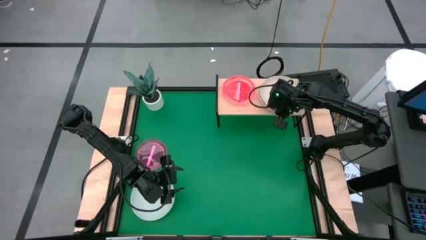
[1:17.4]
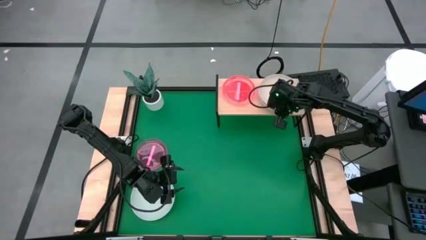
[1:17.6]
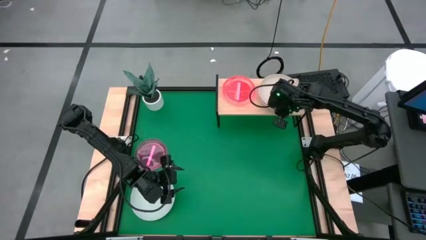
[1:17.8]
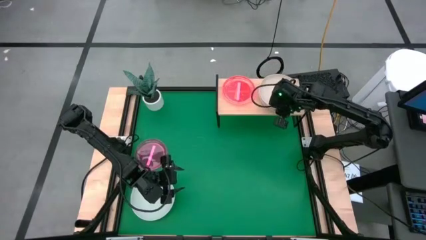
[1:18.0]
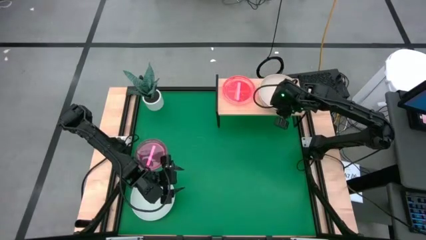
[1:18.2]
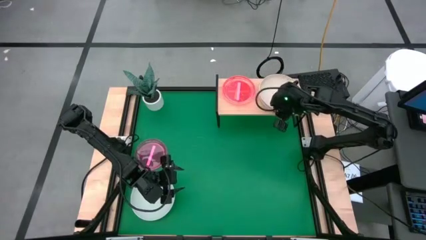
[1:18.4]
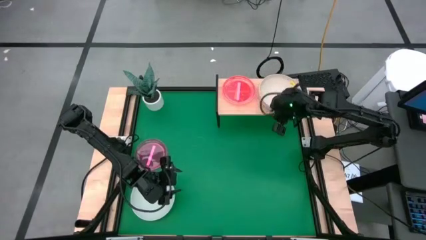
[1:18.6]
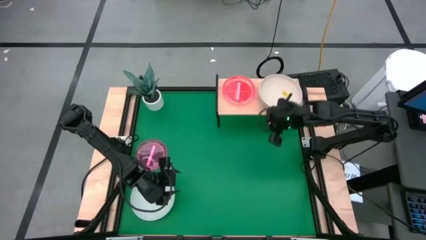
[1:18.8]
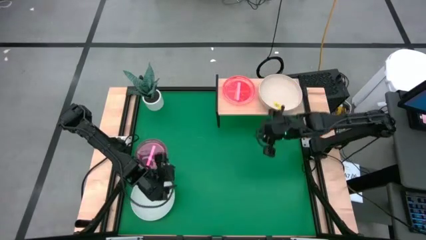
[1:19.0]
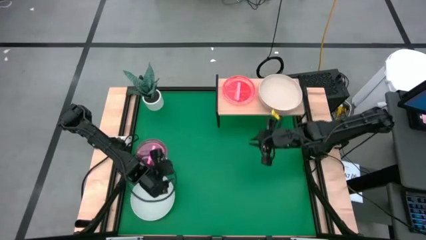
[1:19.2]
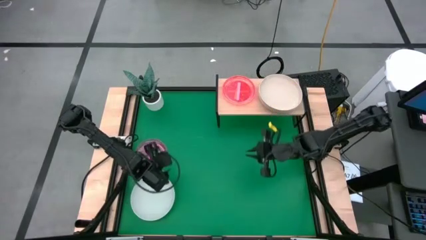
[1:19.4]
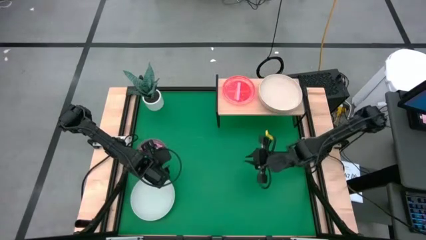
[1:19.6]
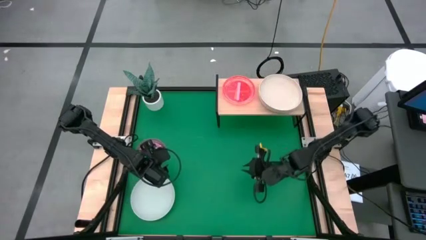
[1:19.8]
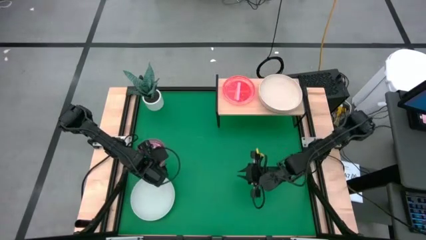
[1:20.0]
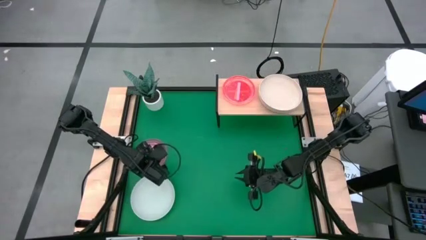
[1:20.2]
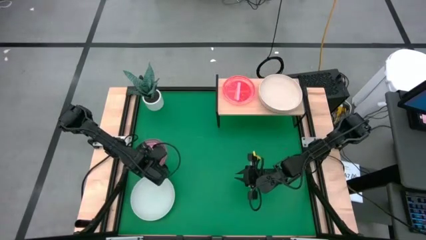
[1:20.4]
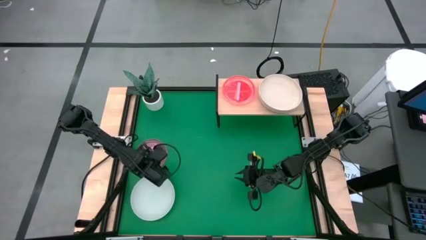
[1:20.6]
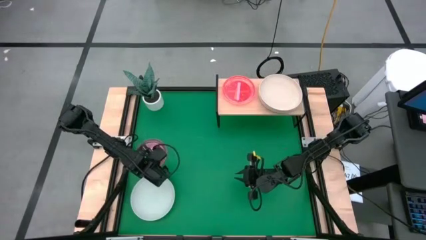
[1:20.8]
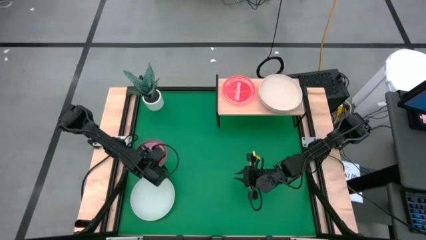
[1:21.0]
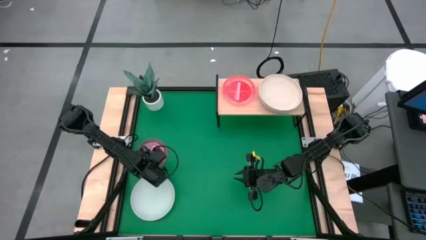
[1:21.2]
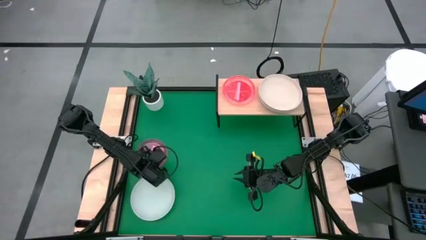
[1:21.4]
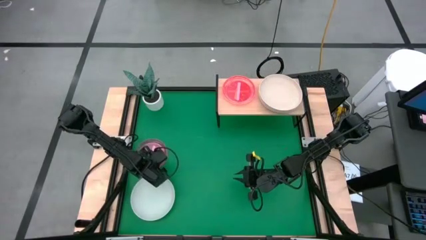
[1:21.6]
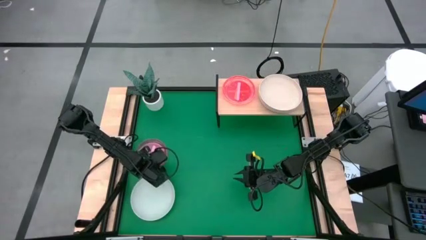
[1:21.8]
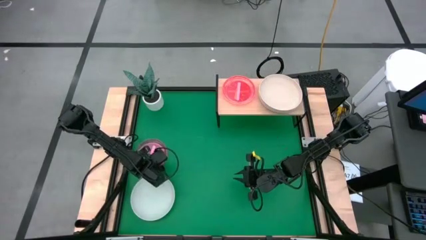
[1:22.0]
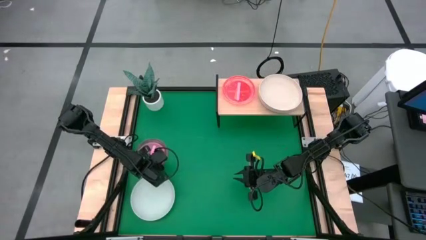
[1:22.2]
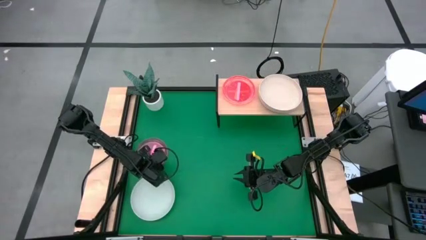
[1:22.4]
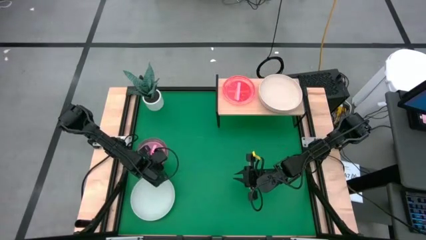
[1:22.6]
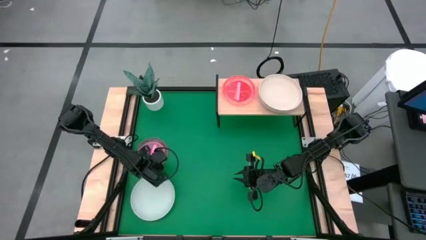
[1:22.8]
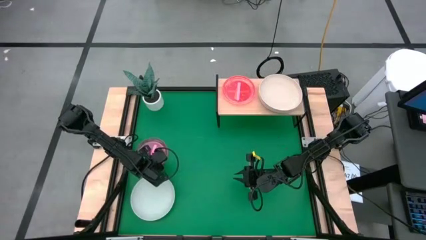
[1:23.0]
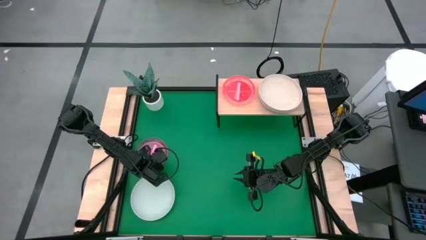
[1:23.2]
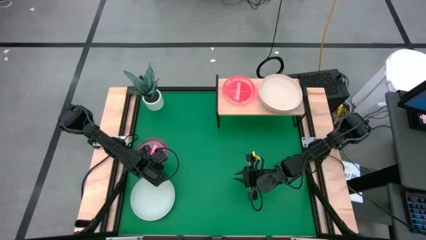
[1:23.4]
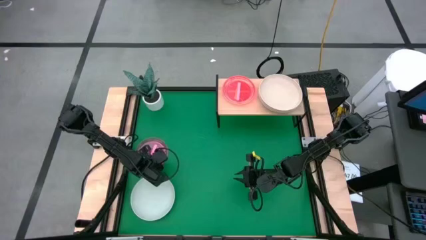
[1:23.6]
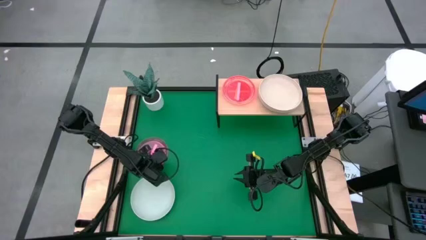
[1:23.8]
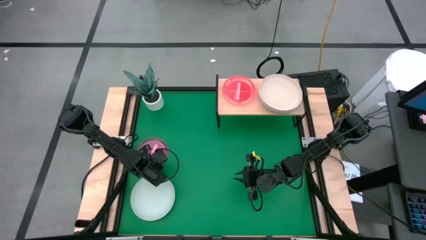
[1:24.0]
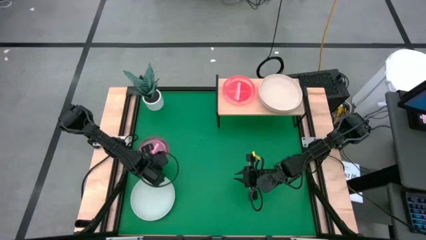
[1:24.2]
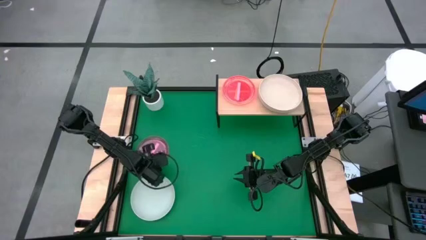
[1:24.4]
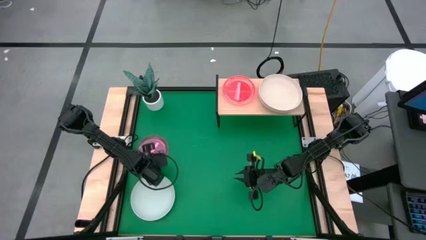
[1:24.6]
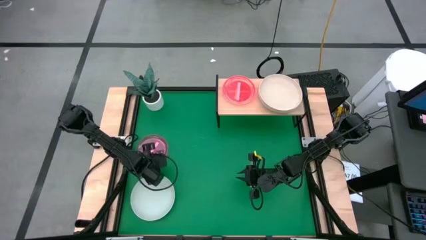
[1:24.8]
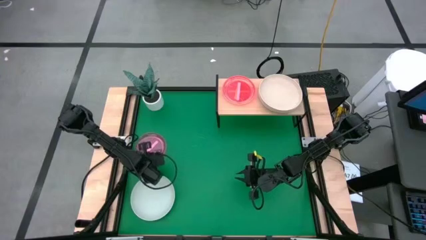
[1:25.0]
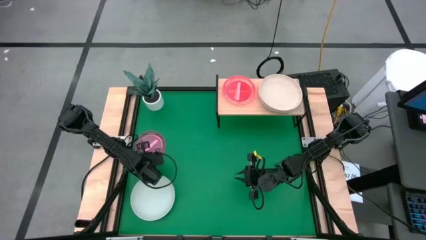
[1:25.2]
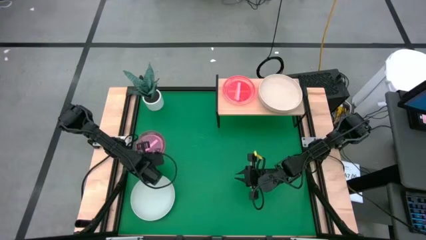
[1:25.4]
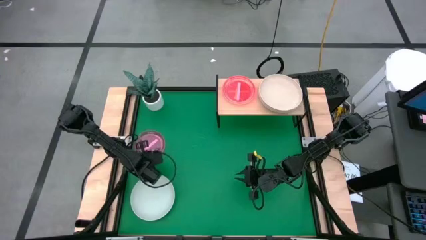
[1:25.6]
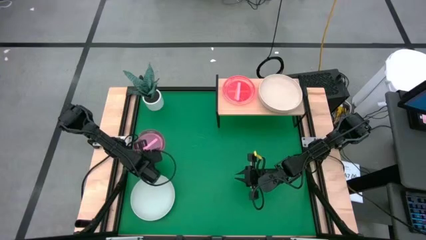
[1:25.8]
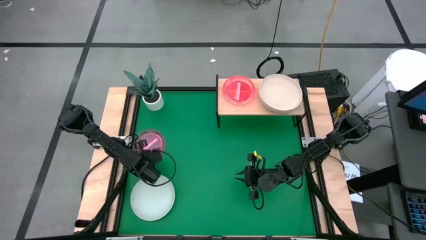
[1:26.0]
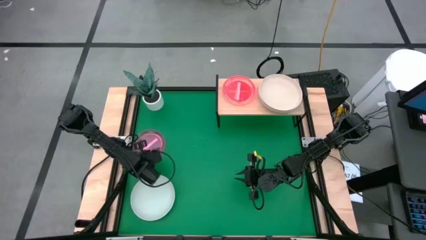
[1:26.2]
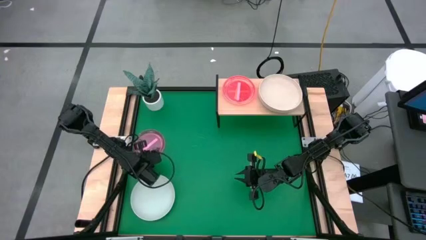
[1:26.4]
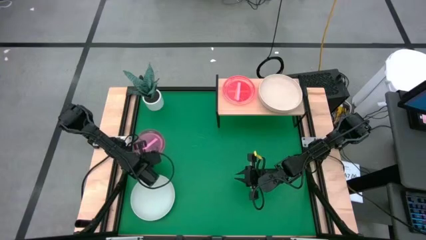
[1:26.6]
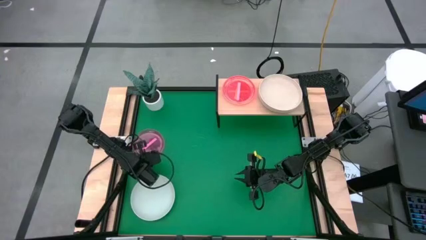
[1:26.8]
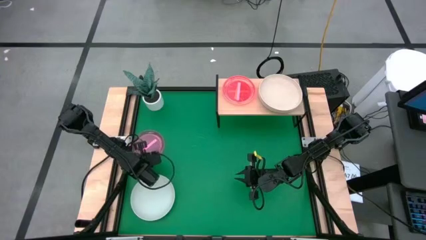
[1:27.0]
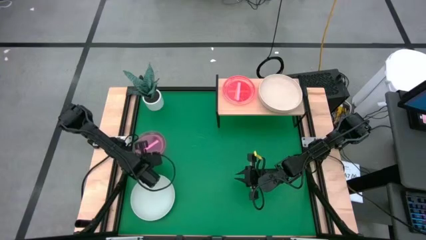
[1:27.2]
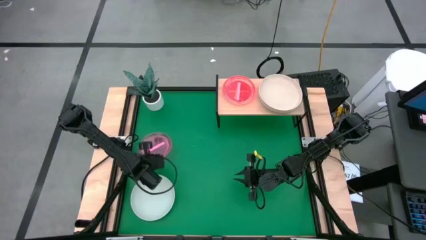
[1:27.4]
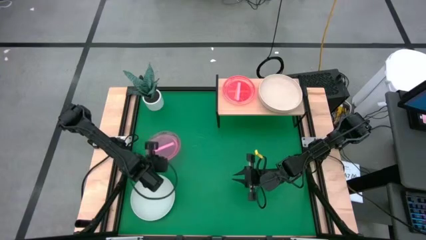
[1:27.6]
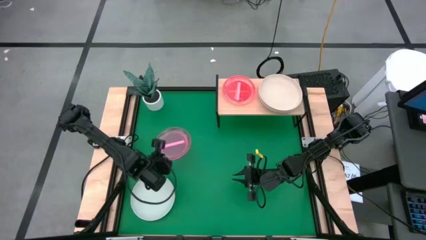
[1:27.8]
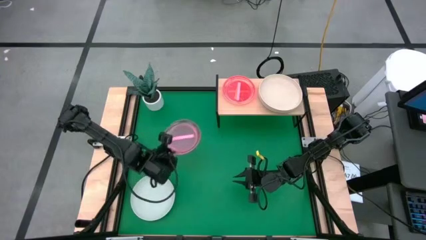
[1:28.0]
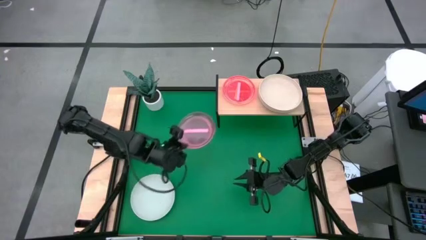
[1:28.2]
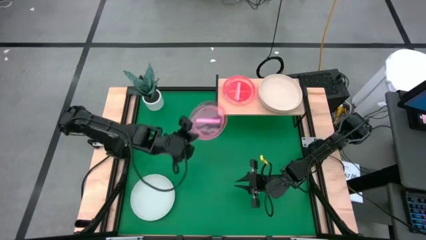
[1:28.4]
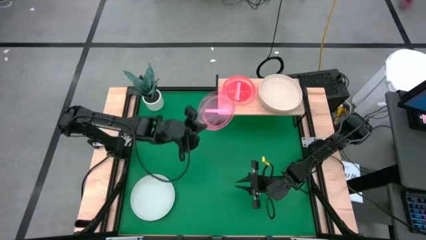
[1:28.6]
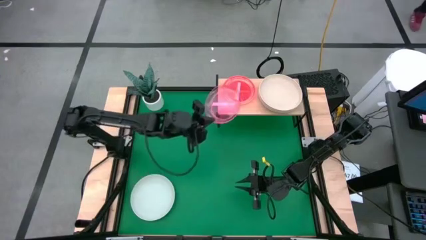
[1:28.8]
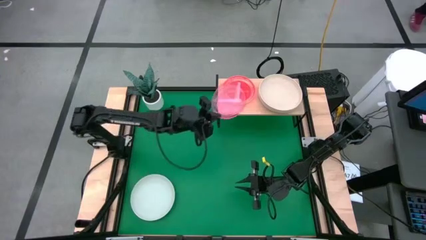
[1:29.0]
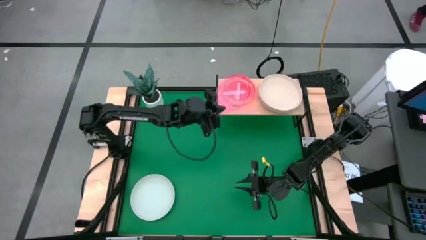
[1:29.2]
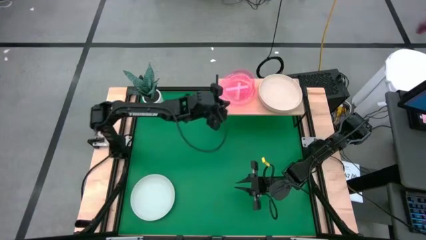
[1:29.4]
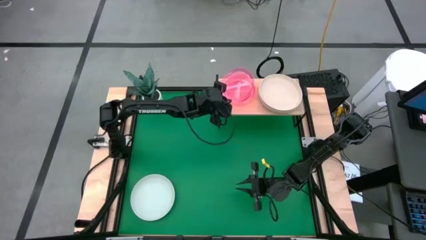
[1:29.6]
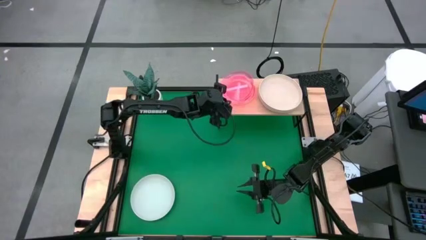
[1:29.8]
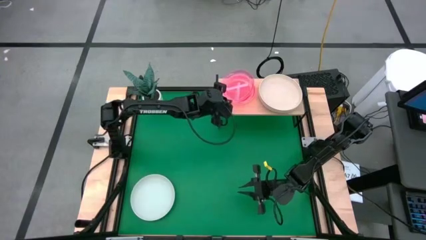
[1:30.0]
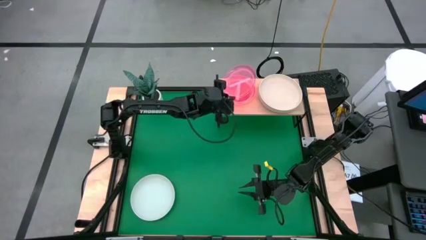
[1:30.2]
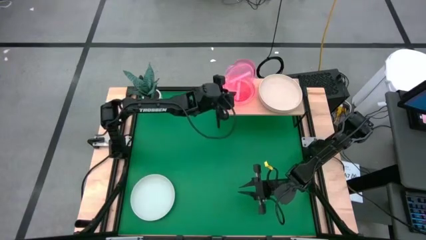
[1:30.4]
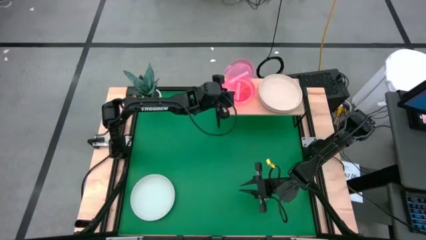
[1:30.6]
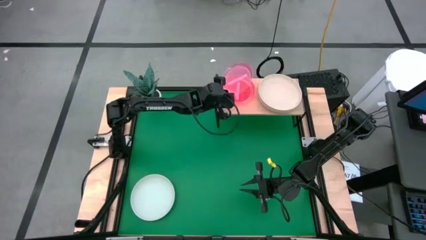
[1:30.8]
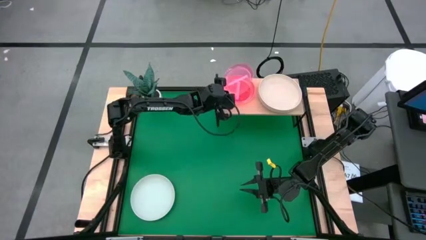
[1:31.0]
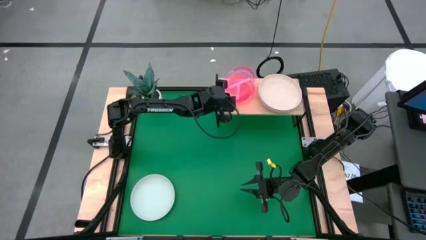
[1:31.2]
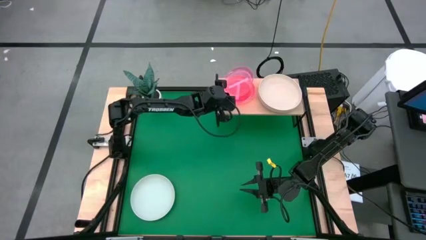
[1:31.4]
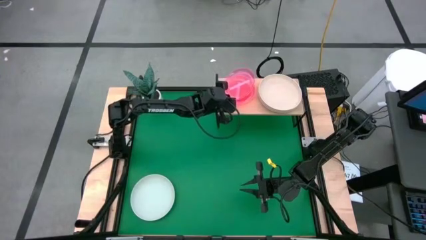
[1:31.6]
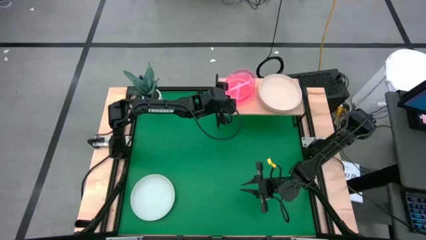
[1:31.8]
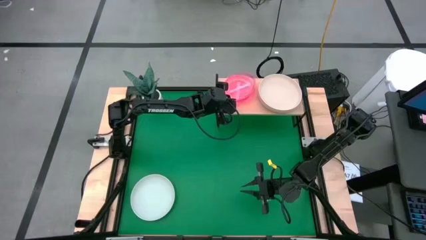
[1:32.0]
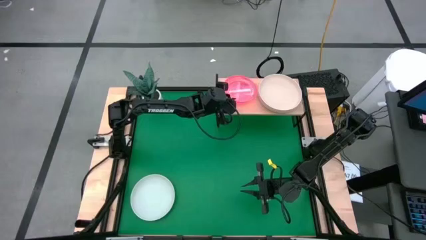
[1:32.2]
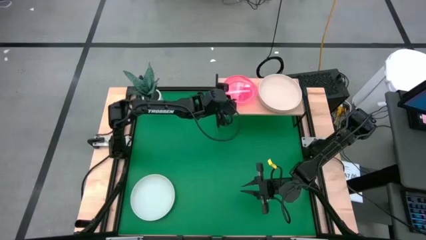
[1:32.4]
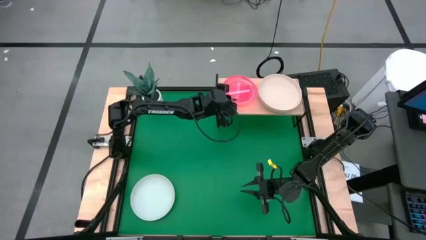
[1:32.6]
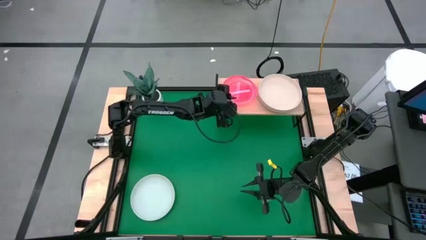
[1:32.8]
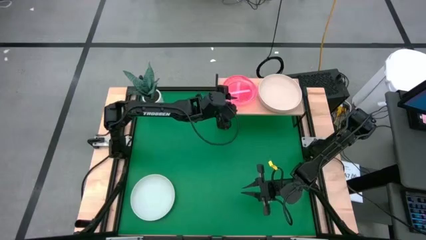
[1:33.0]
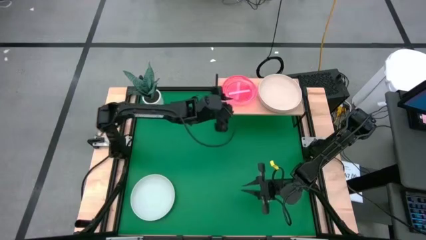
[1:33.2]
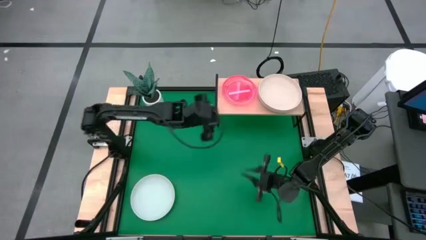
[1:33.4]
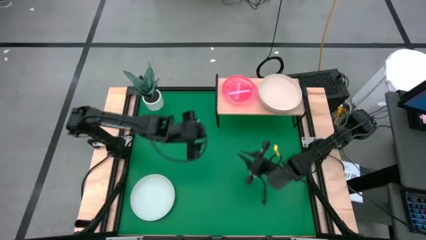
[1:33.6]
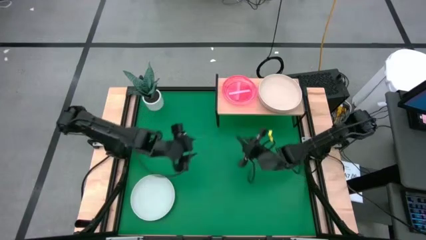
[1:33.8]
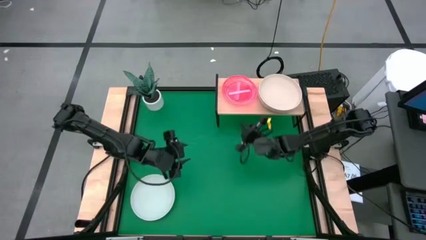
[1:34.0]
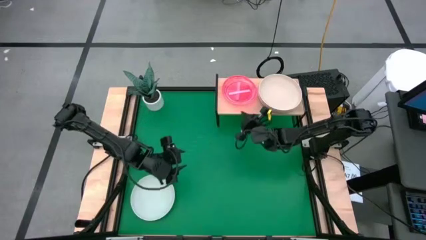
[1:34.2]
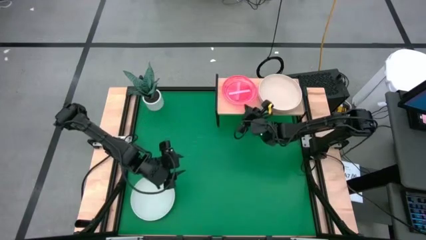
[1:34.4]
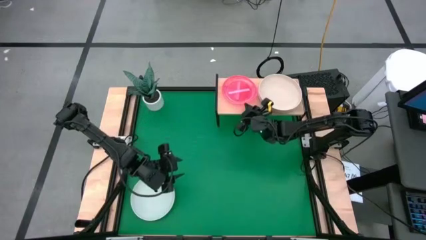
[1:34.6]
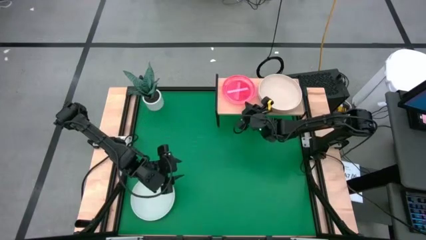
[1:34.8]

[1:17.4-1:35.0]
Task: Place and stack plates onto a shelf
Stack the small pink plate on top of the small pink plate on the shelf
